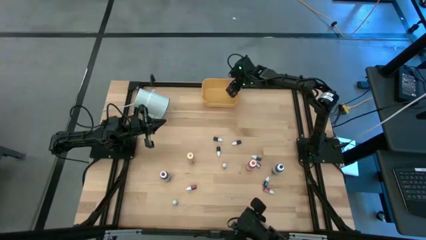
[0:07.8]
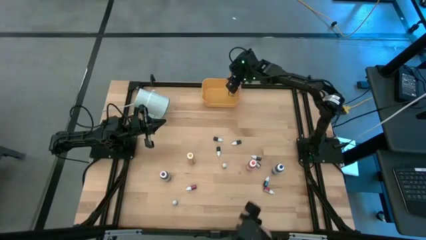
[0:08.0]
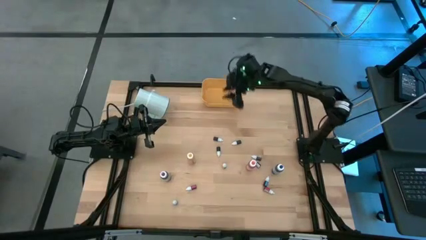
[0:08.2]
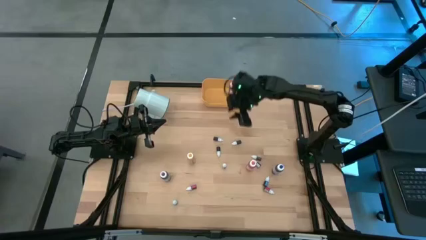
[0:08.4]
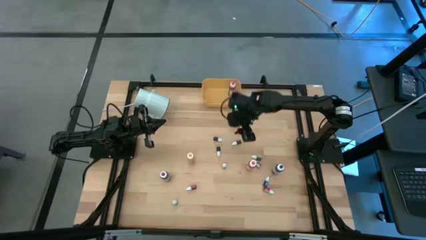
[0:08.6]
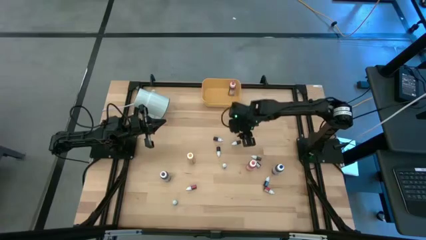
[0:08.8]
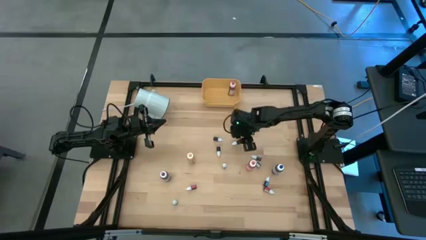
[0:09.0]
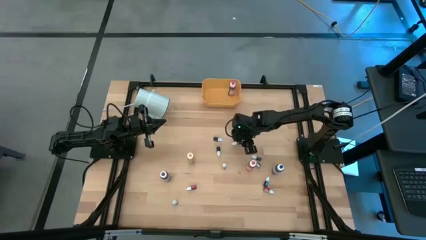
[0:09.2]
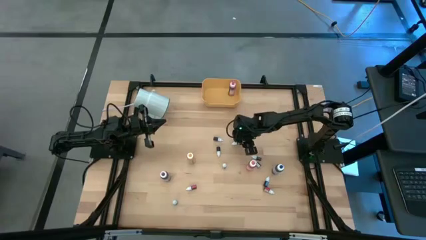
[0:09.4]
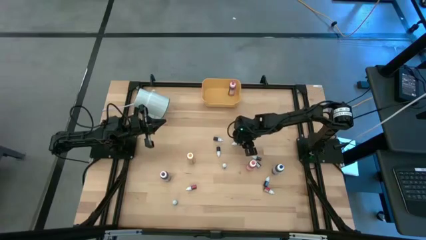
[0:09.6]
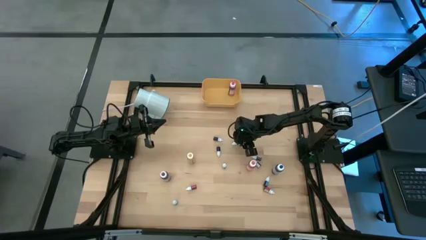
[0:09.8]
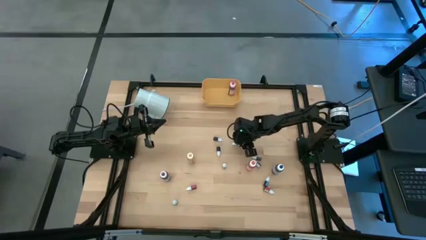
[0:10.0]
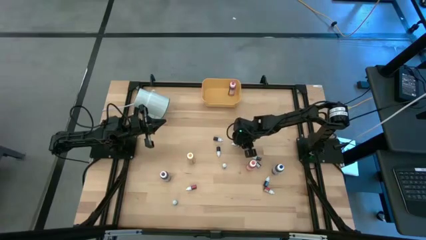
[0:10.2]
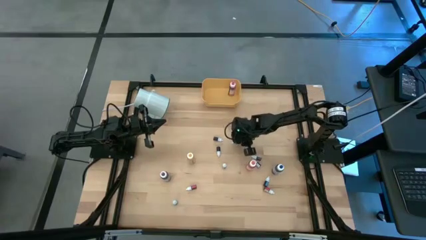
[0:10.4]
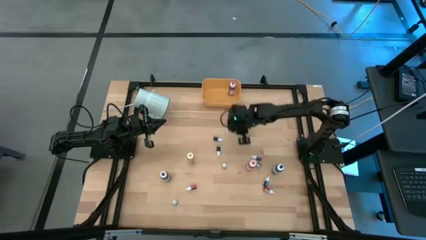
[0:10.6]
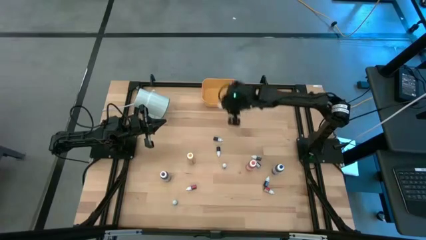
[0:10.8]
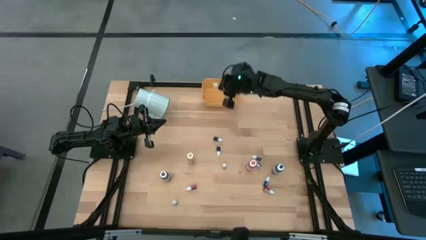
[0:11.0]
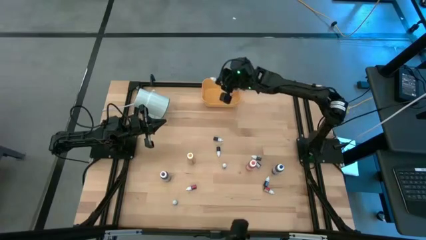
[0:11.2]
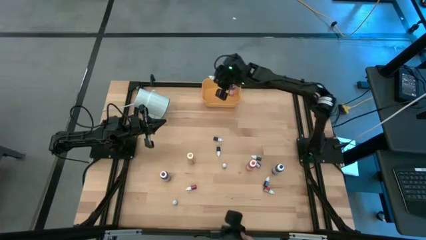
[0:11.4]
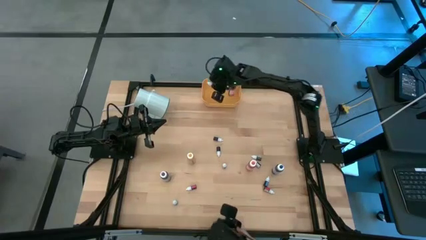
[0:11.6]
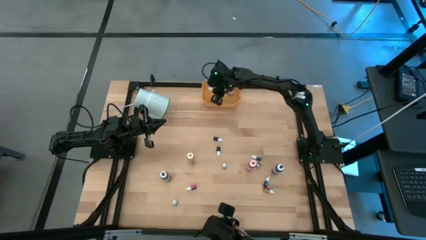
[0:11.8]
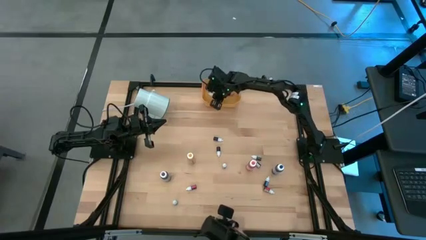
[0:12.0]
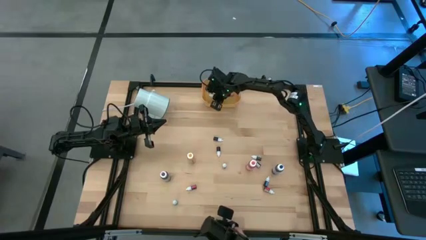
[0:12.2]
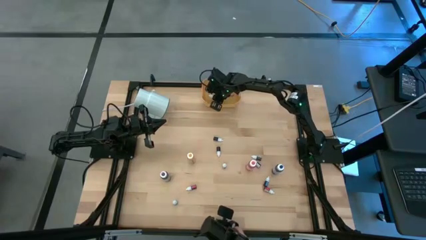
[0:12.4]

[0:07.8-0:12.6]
Task: Pick & Place food coloring
Put the red food coloring bottle into the yellow bin

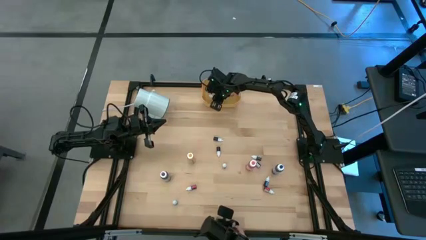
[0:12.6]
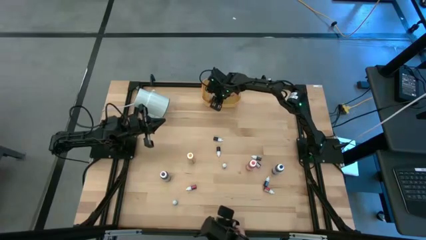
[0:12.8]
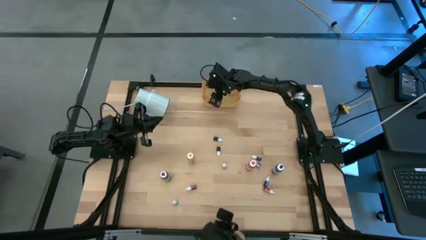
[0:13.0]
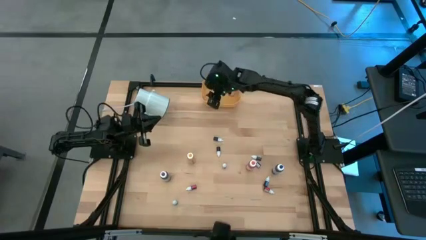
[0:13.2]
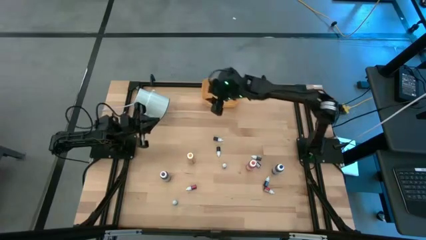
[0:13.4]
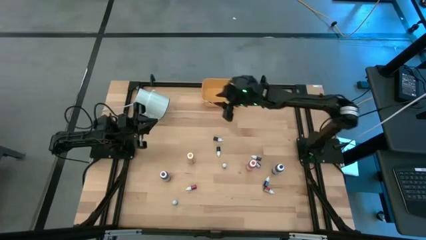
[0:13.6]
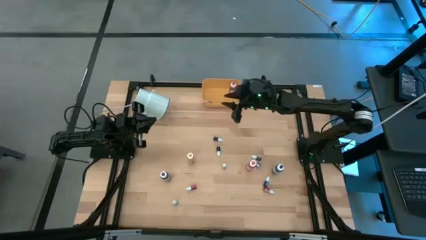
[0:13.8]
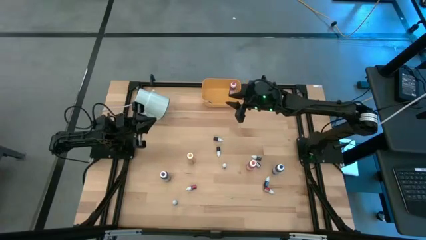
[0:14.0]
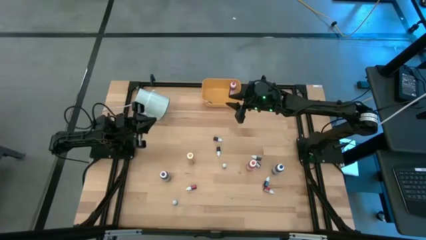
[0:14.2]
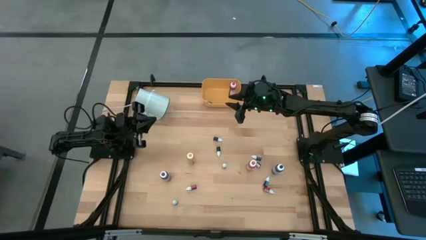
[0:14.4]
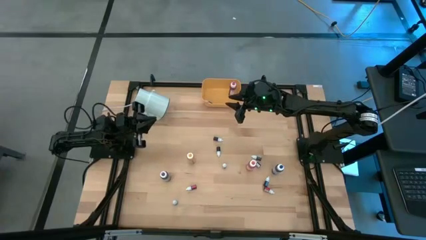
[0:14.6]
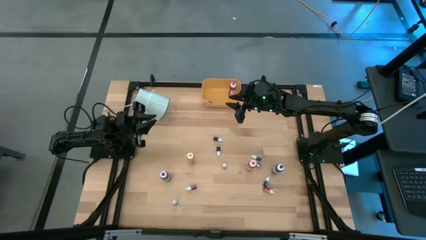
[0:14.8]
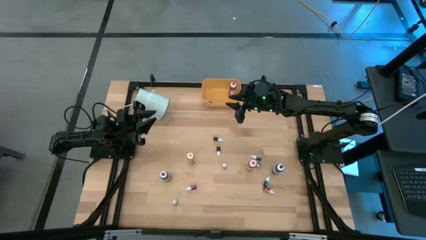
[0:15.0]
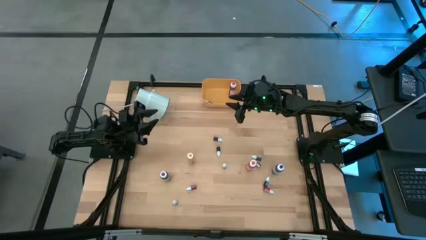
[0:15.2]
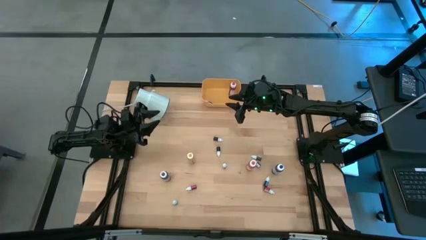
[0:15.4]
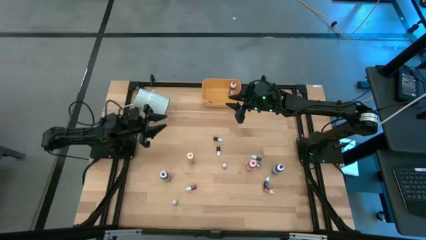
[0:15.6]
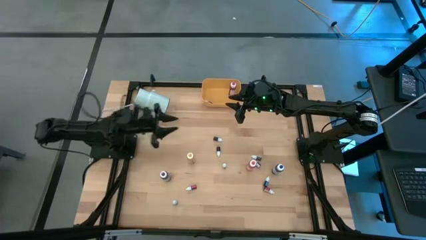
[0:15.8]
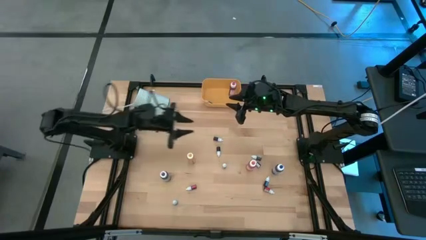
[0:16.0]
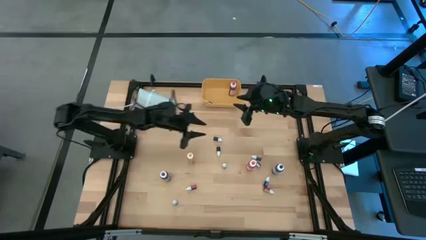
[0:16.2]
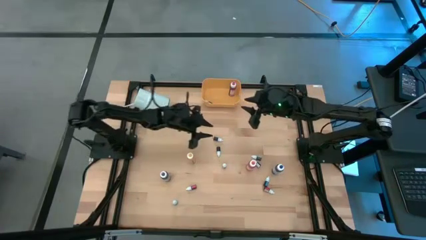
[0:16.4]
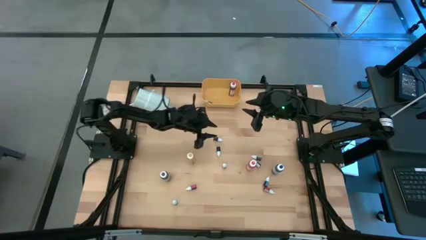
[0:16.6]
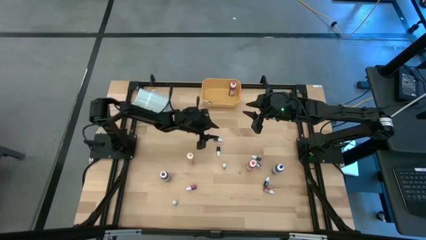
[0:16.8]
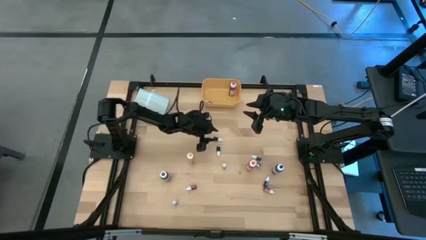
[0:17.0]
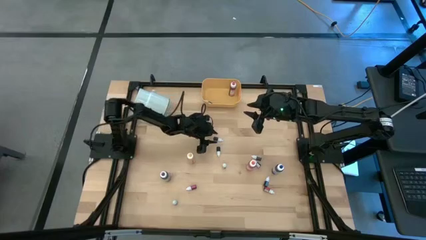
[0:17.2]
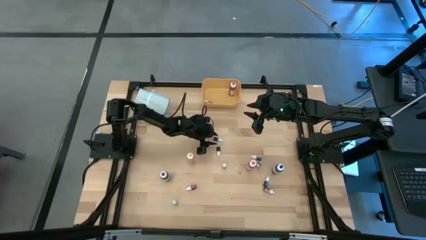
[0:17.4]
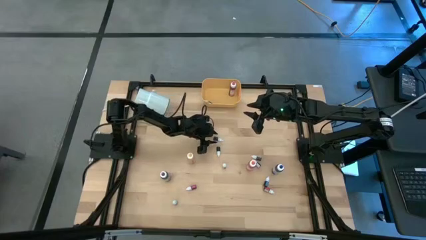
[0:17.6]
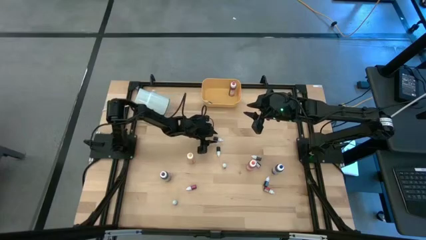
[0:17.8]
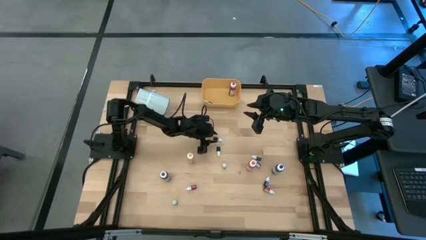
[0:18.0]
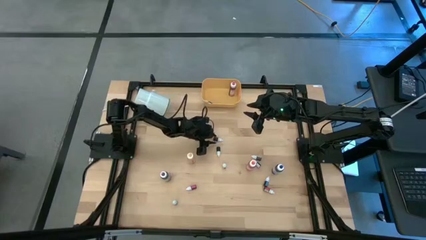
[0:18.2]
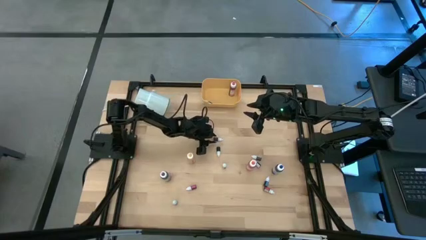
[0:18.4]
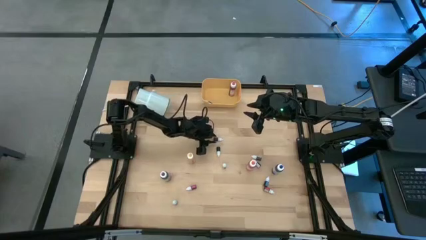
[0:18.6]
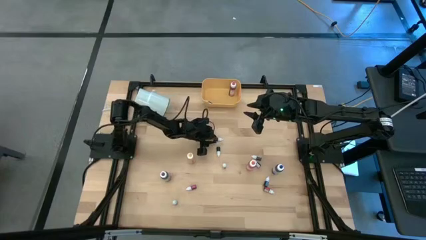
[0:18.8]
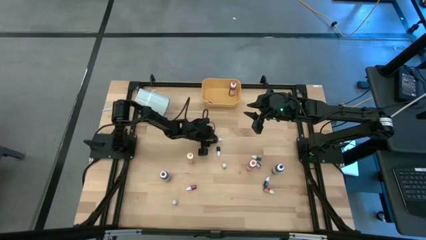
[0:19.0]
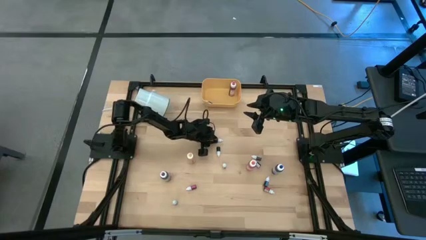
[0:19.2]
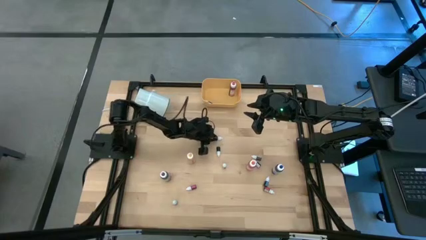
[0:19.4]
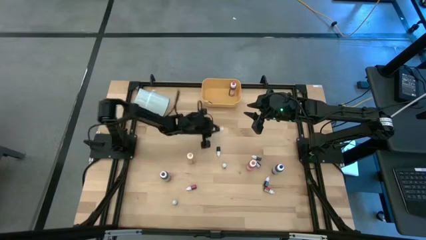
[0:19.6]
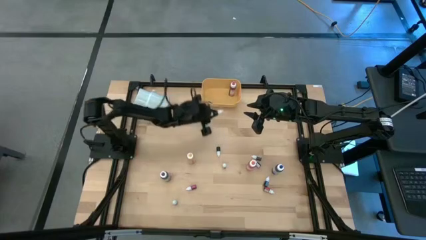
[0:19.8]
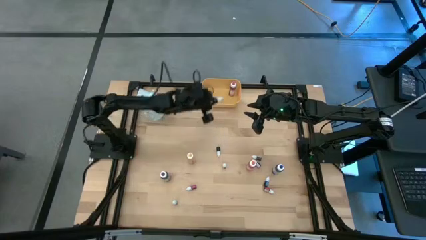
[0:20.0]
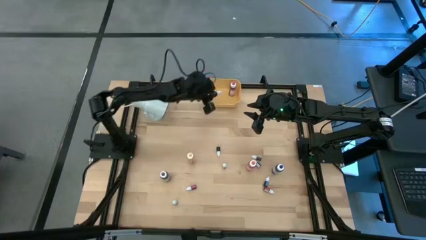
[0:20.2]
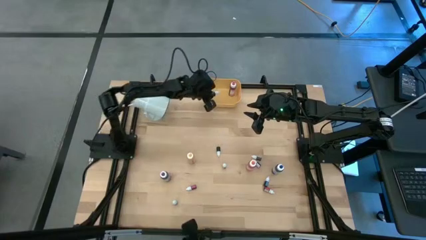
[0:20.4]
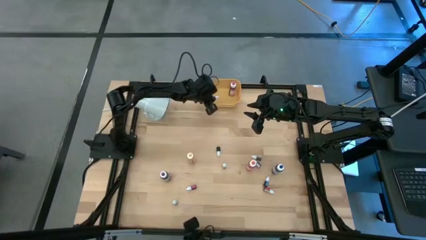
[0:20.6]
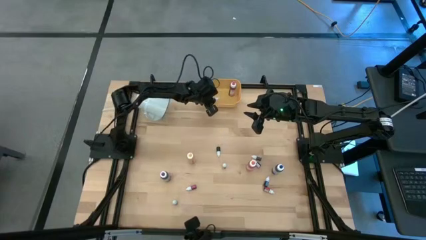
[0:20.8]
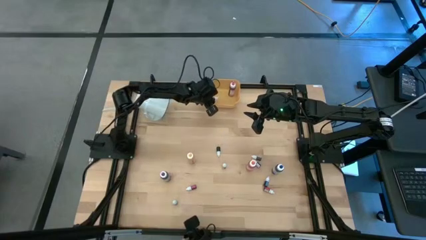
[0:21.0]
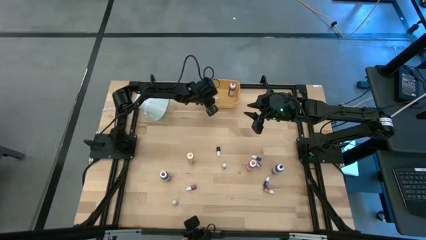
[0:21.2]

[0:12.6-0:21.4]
Put the black food coloring bottle into the yellow bin

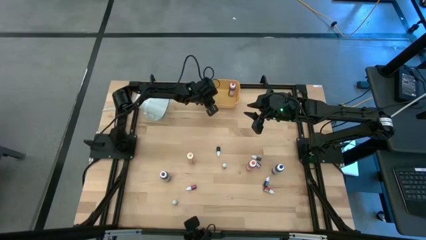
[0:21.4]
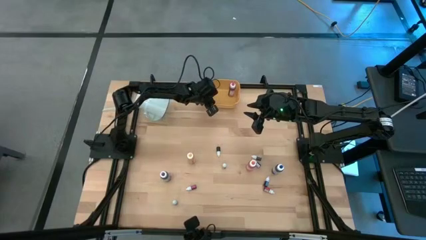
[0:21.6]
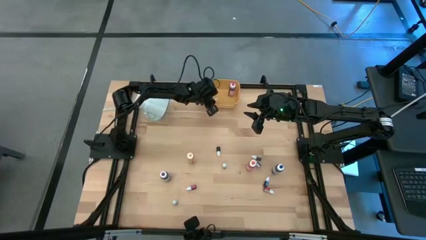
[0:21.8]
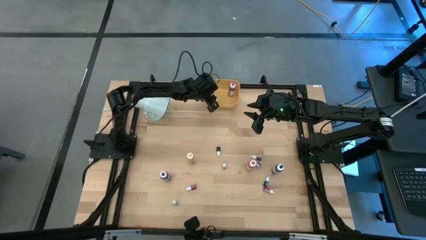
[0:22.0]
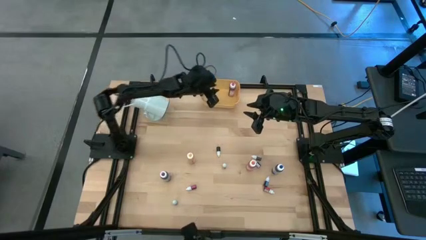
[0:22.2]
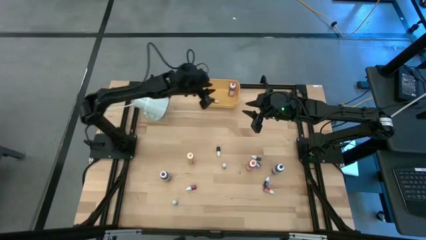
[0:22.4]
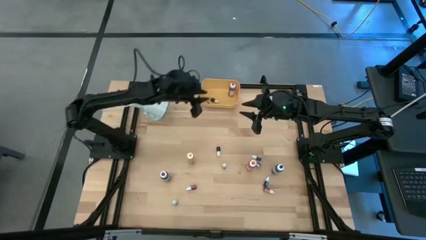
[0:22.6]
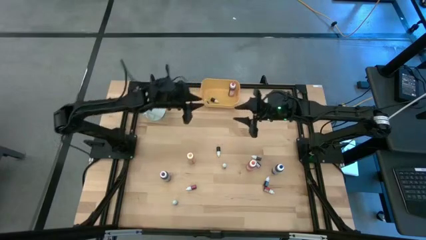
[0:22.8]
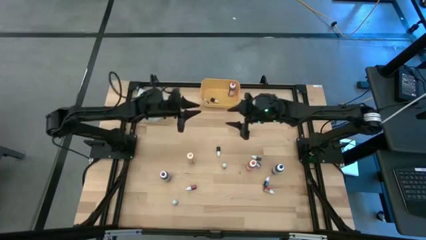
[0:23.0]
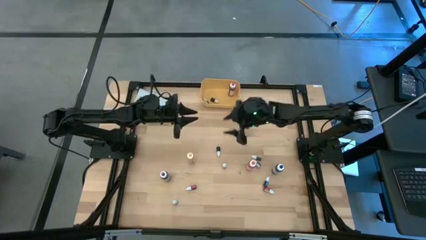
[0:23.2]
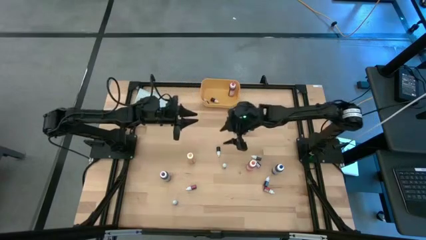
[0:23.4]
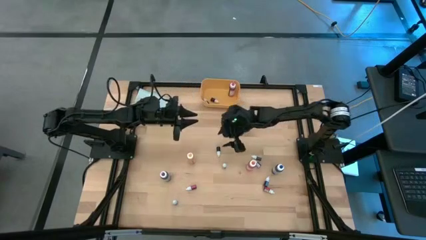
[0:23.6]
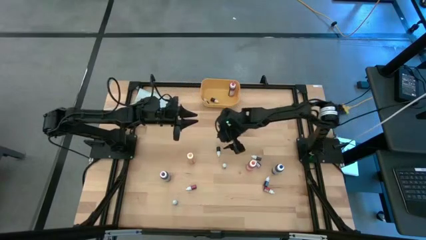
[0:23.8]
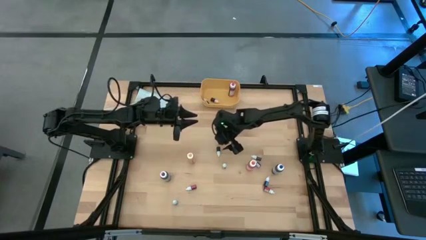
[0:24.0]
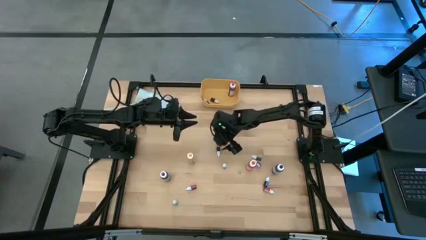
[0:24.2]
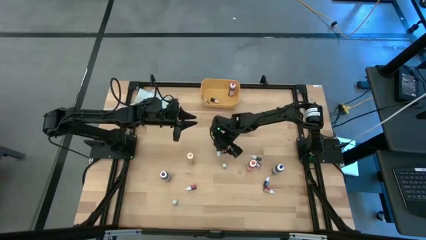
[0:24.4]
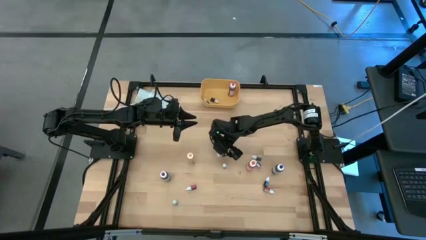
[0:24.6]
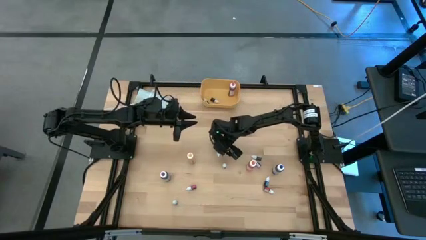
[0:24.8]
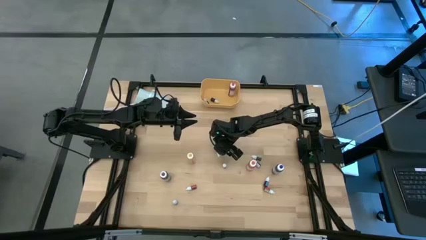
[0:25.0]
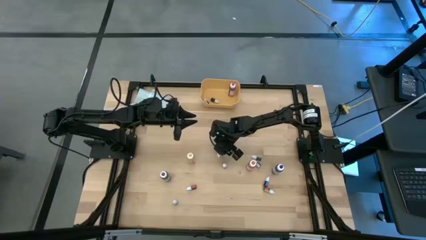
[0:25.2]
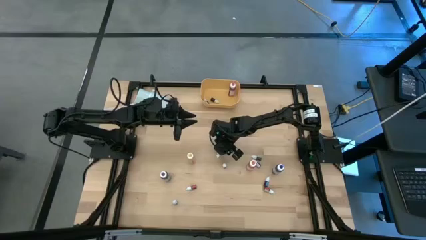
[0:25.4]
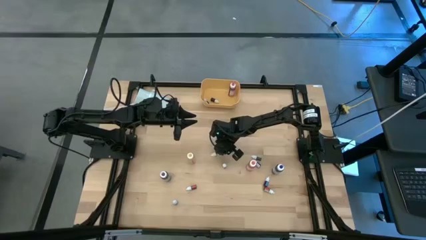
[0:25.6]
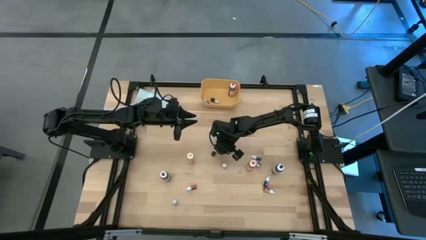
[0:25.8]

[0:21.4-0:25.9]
Put the green food coloring bottle into the yellow bin
